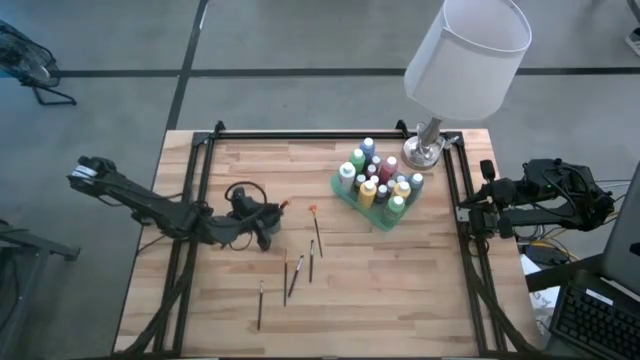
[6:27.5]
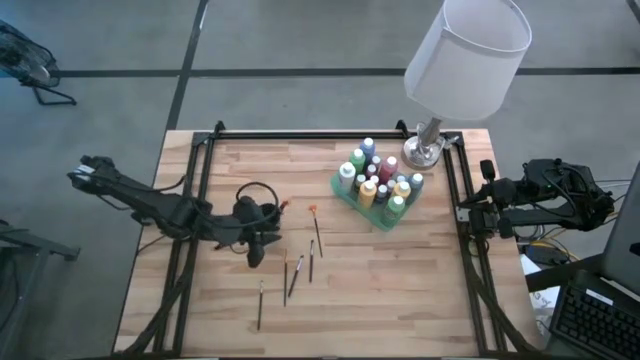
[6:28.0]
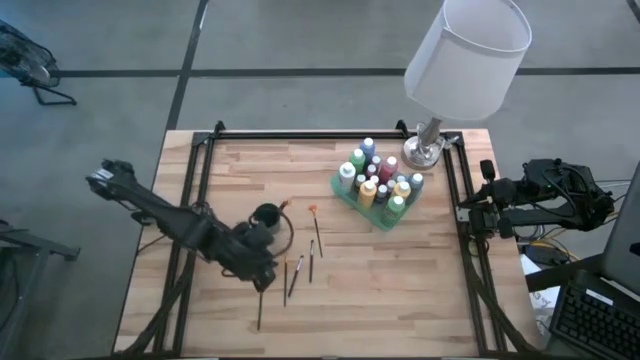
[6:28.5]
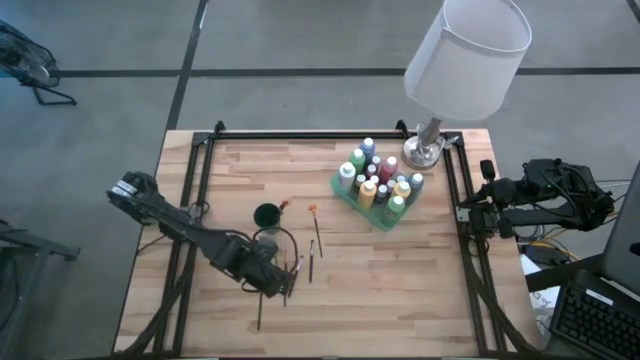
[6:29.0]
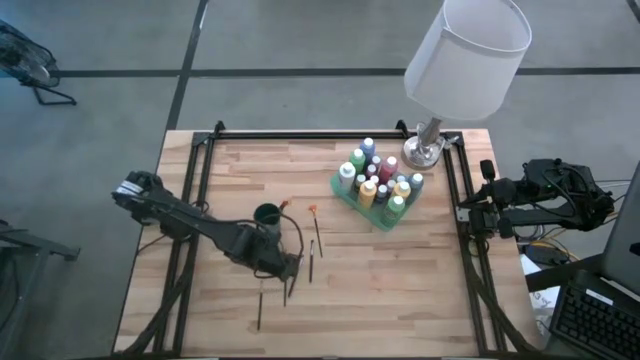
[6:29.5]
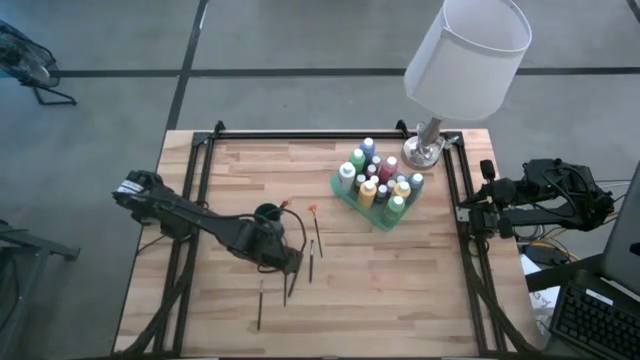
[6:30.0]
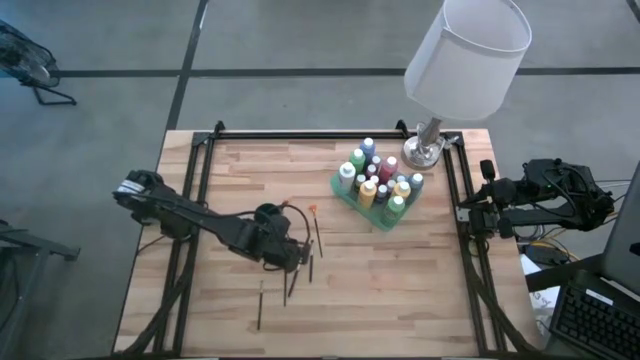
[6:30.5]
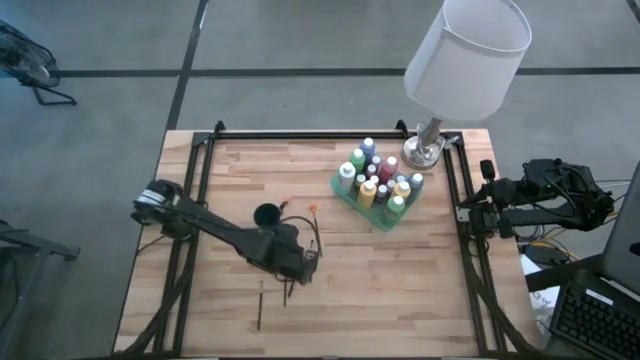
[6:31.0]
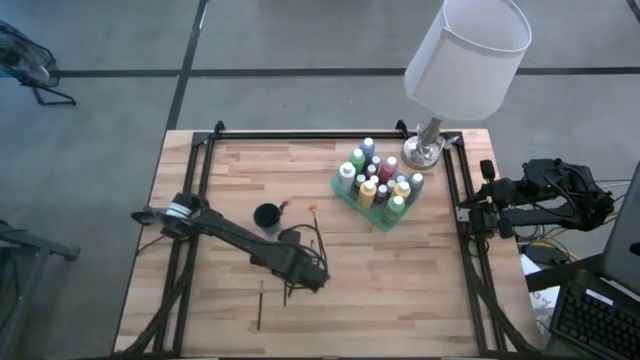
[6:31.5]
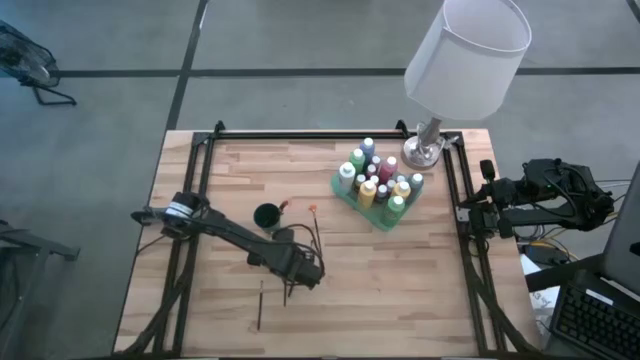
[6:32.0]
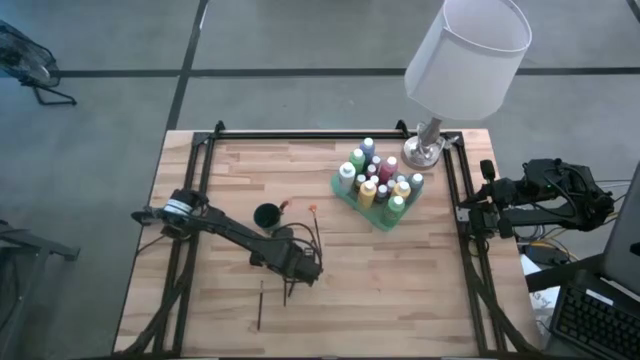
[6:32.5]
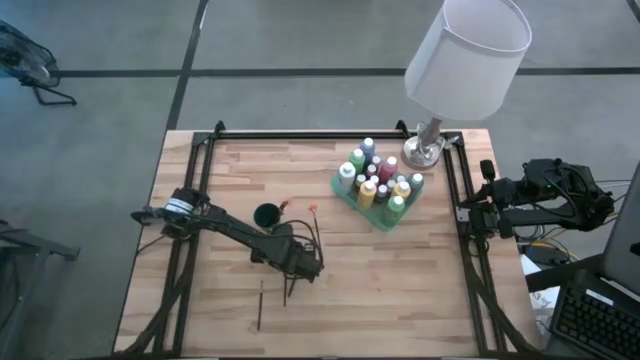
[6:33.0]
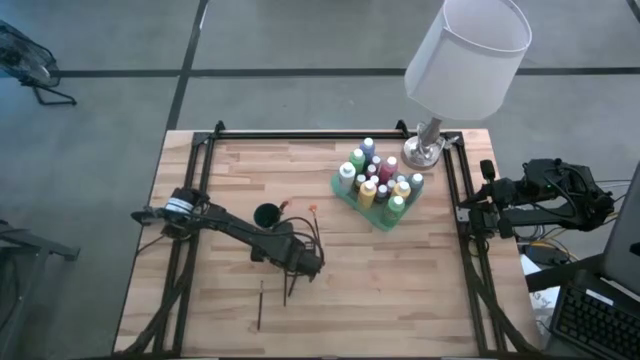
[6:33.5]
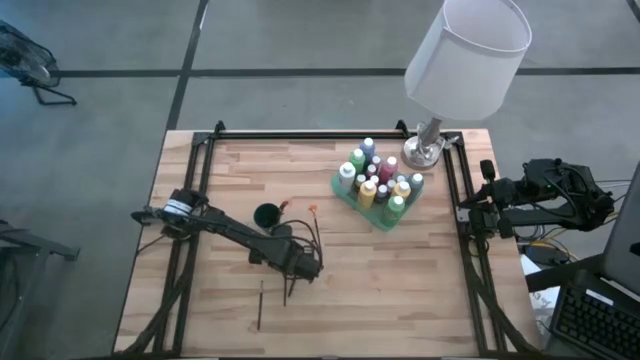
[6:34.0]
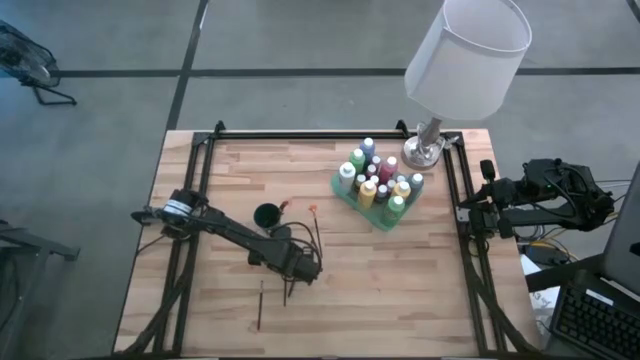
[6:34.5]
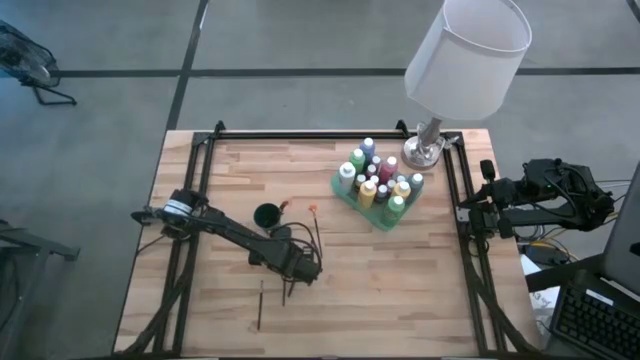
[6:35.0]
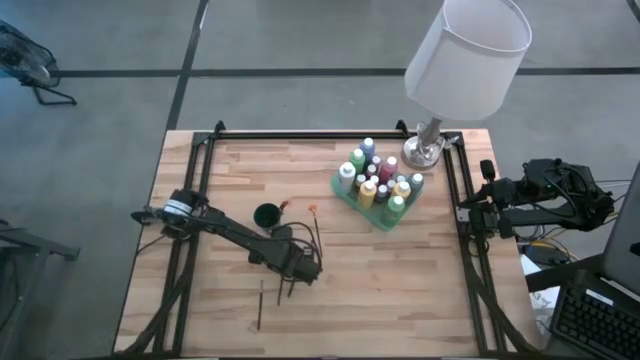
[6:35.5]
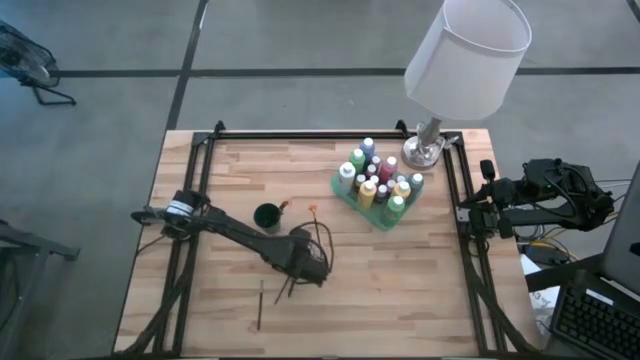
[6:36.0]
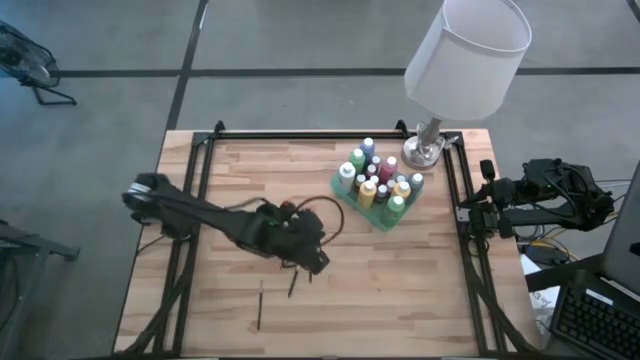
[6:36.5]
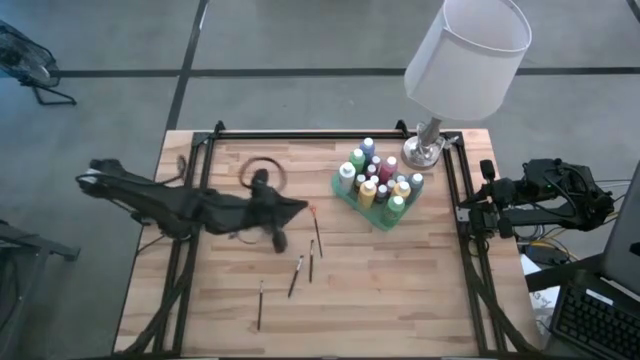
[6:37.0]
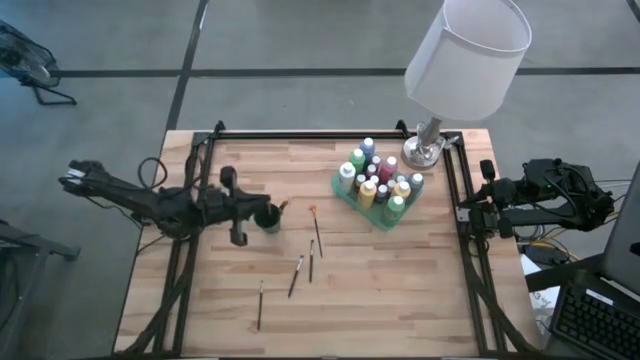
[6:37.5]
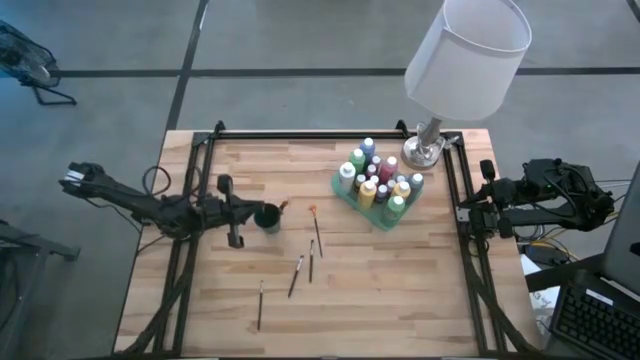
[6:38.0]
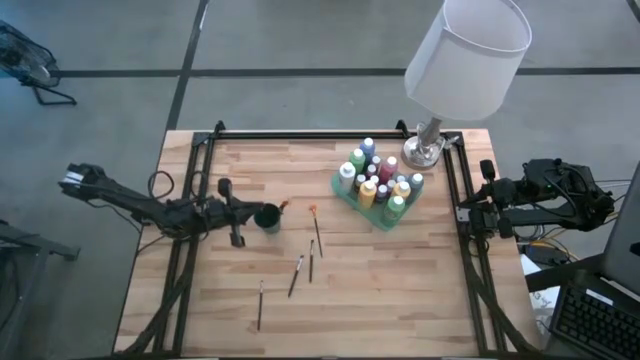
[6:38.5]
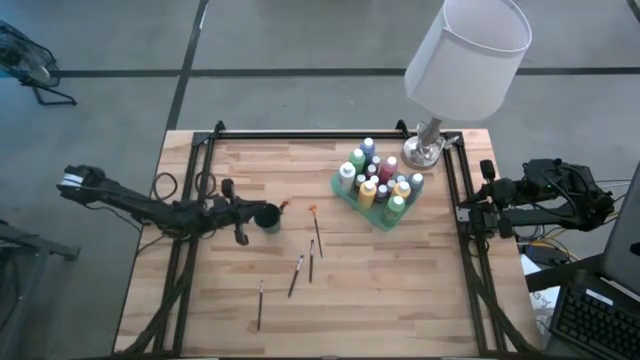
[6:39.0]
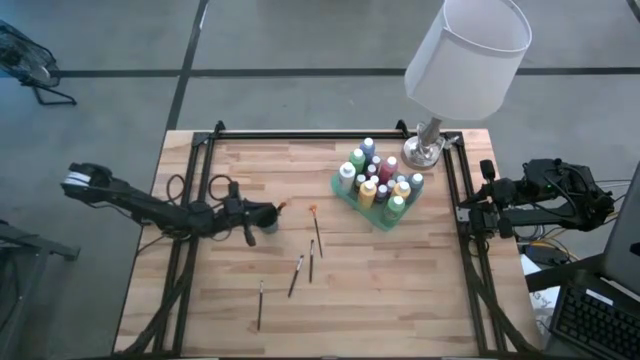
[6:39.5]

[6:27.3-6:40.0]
Task: Pick & Place Paint Supplies
Put the orange paint brush into the green cup

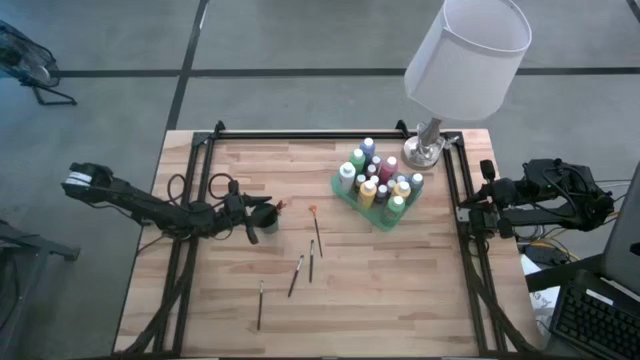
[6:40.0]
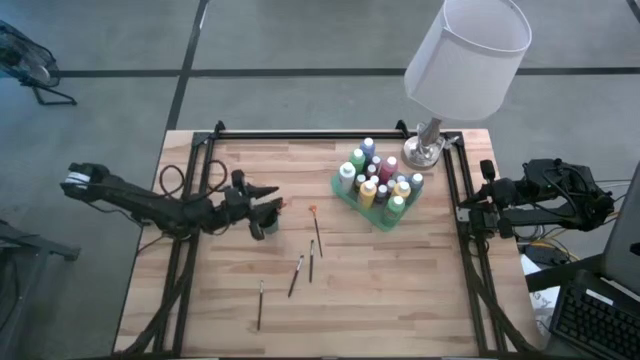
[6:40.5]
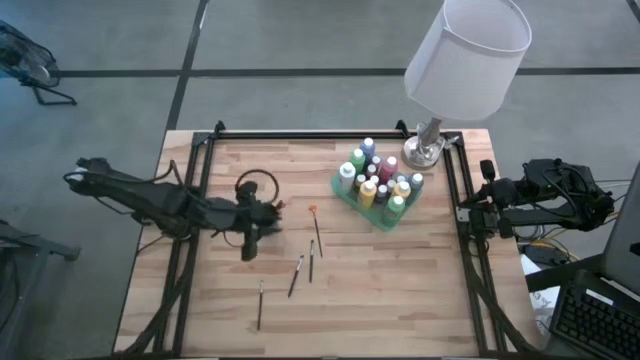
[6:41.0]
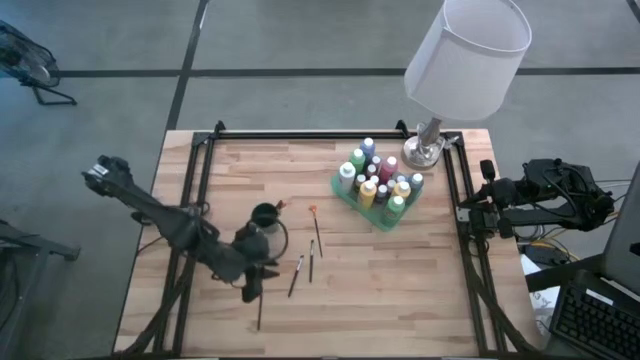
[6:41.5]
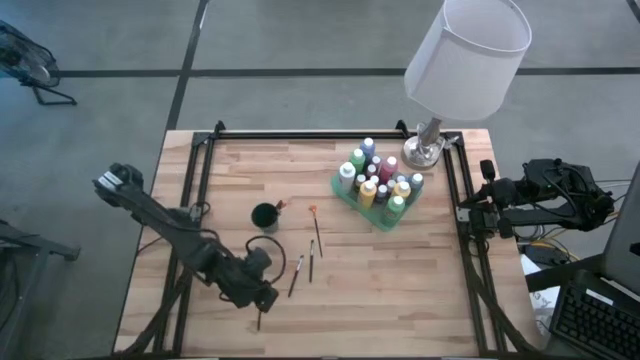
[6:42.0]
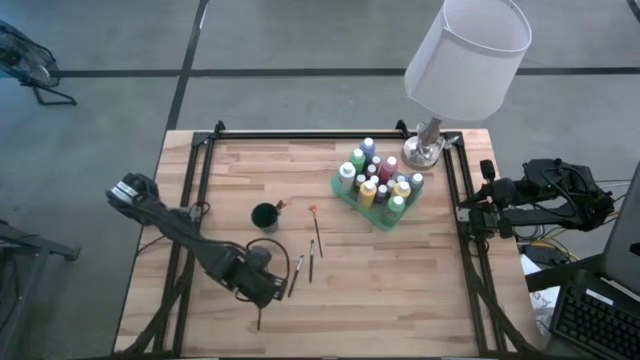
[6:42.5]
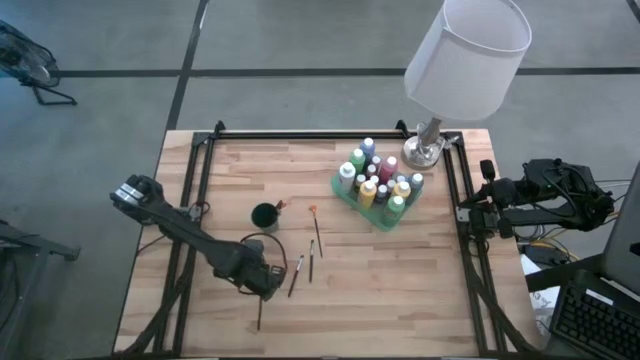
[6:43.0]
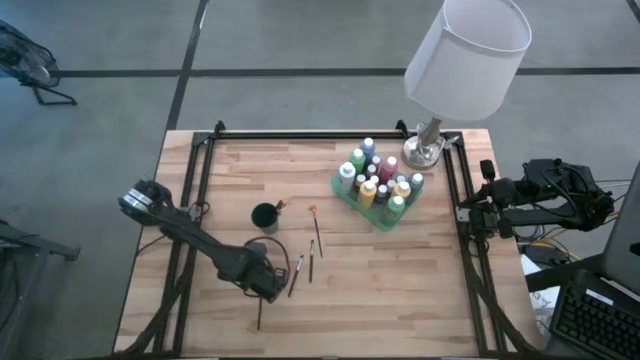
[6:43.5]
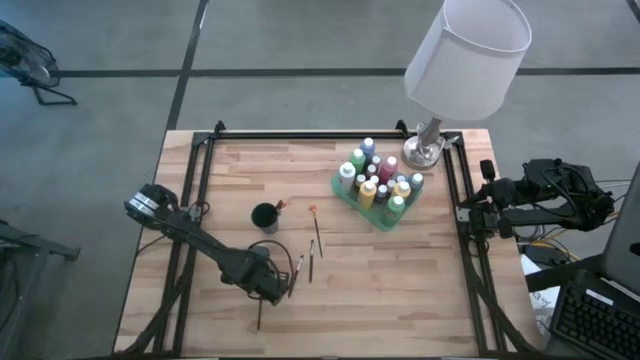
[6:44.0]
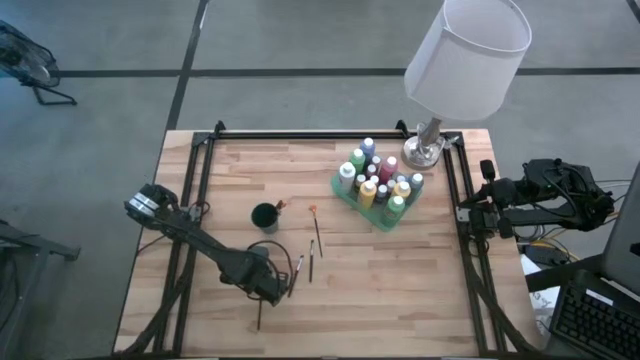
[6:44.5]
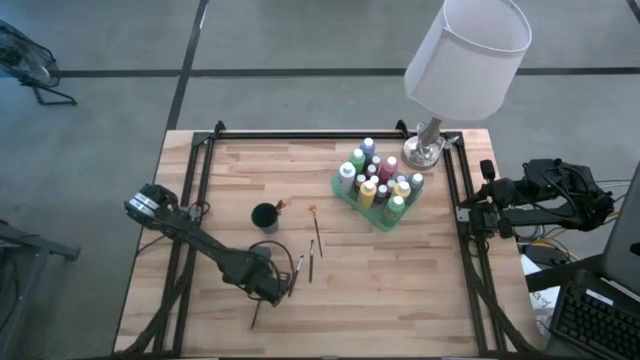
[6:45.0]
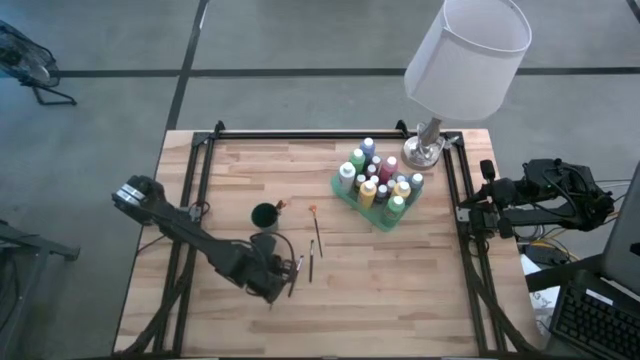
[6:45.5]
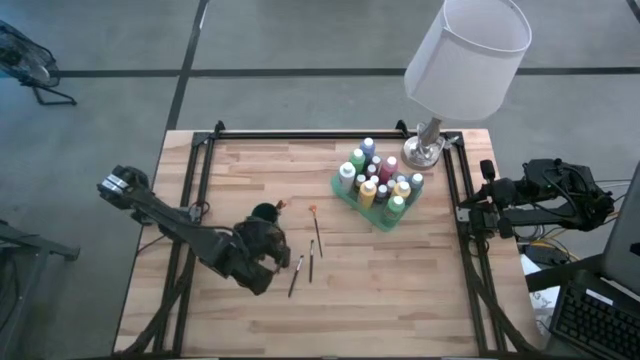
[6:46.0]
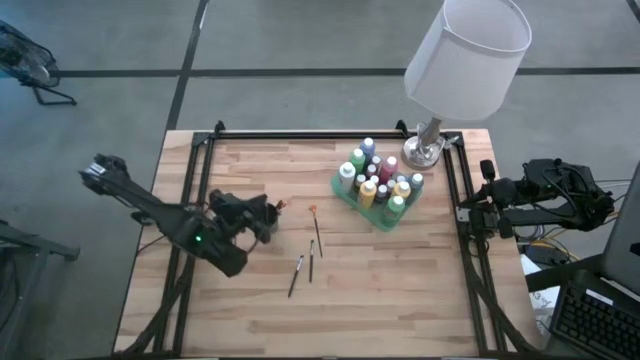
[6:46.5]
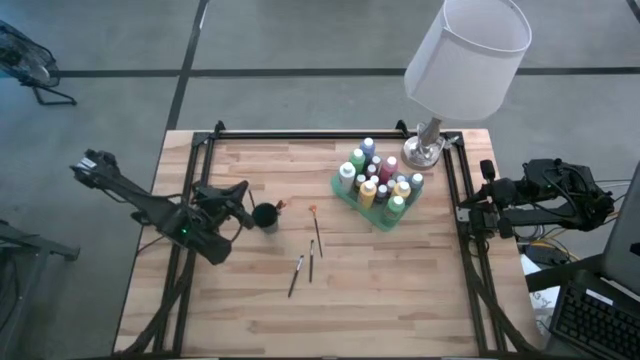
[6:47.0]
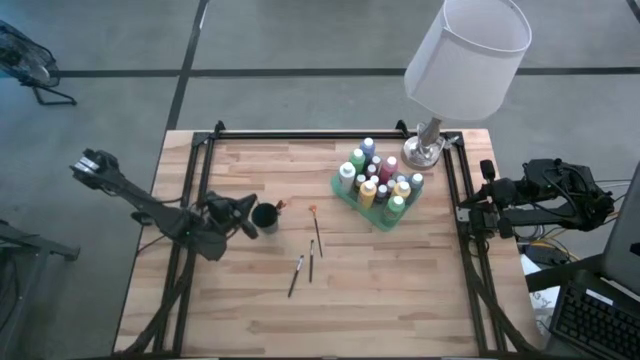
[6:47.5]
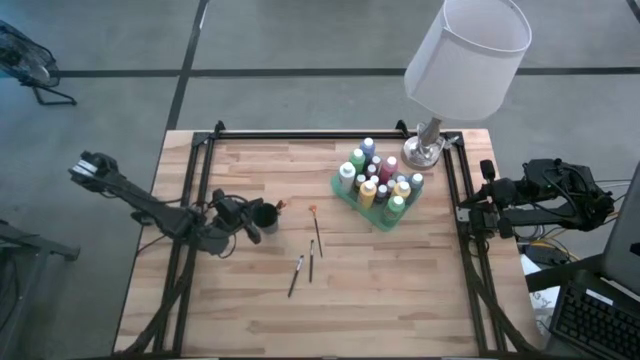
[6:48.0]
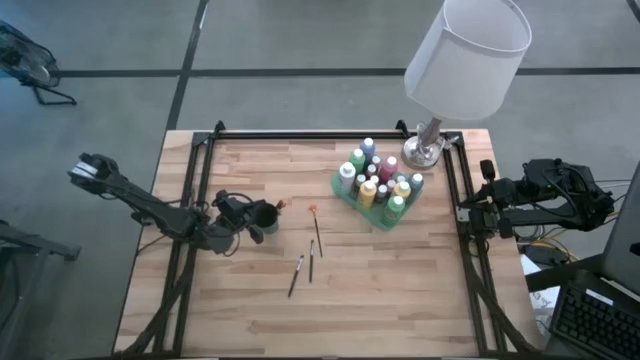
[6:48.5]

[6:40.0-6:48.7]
Put the silver paint brush into the green cup
